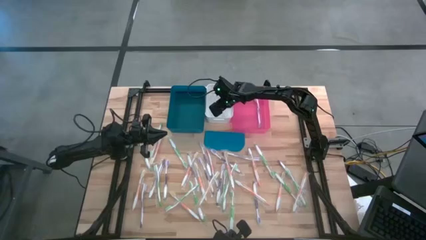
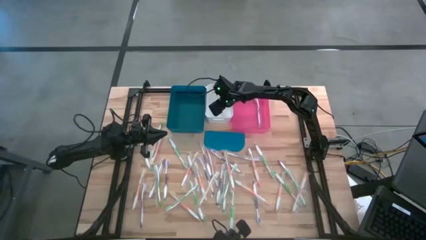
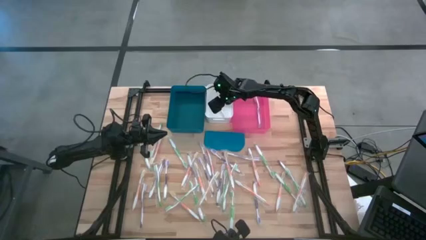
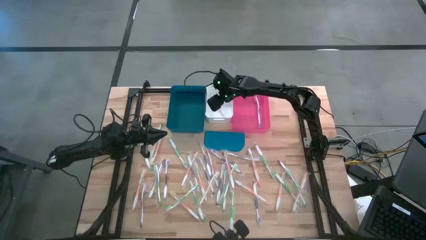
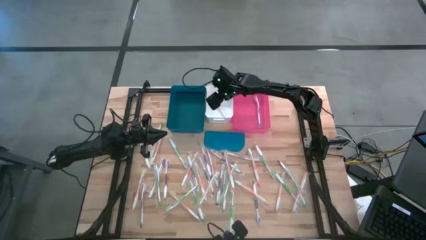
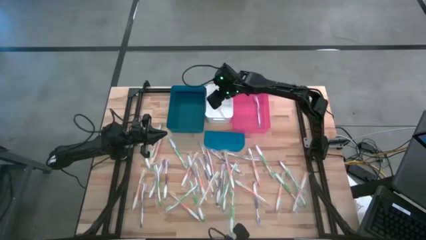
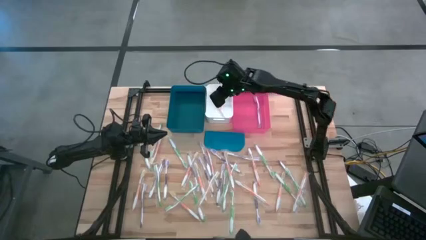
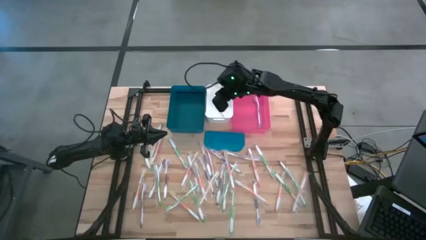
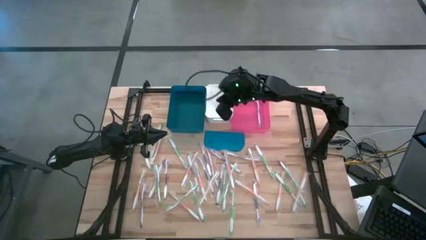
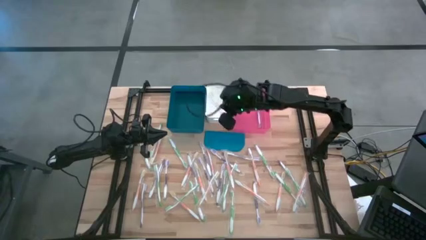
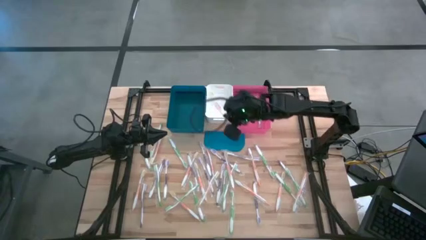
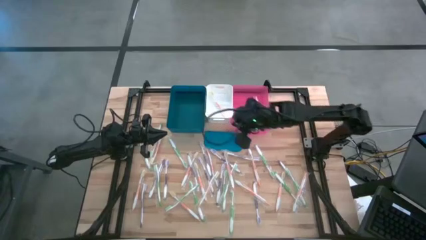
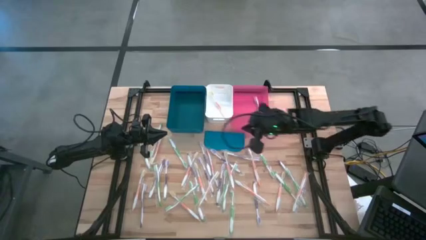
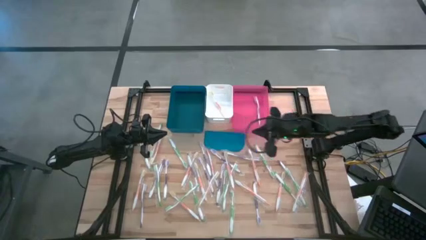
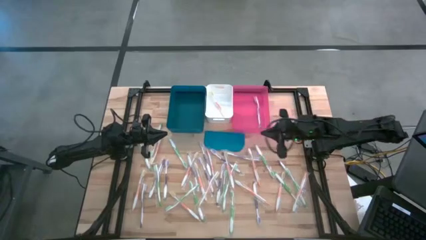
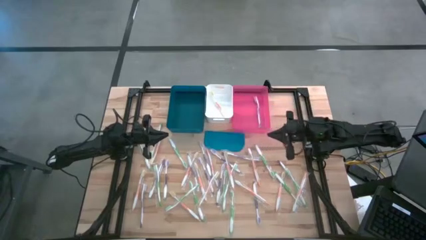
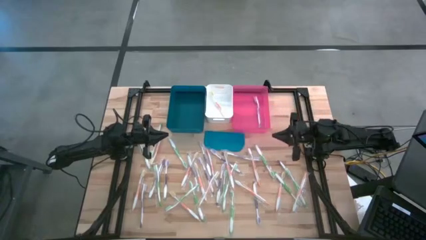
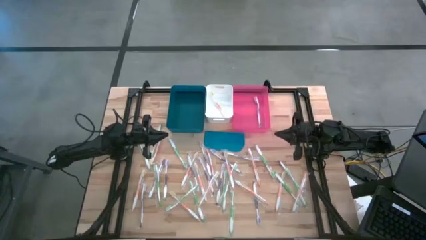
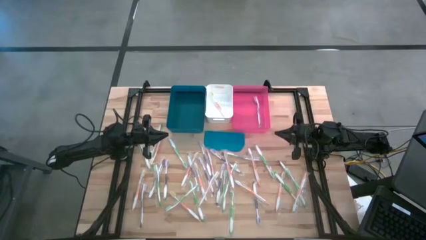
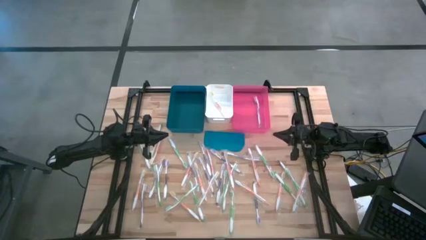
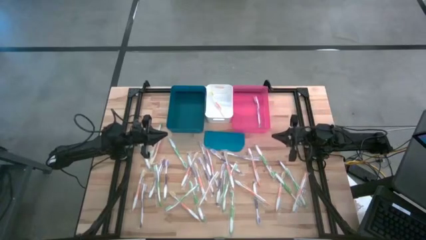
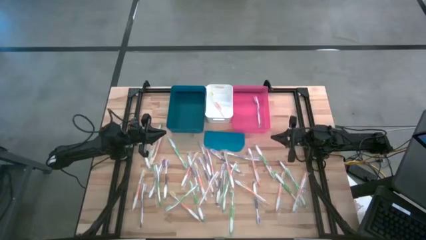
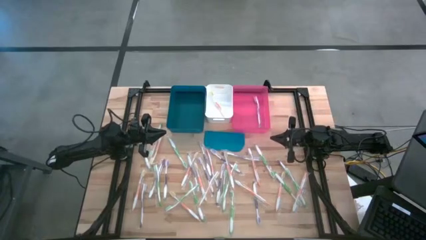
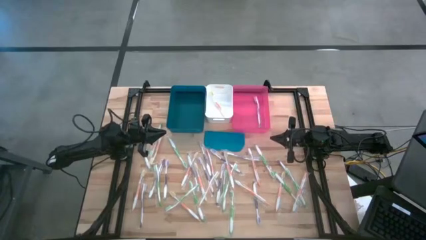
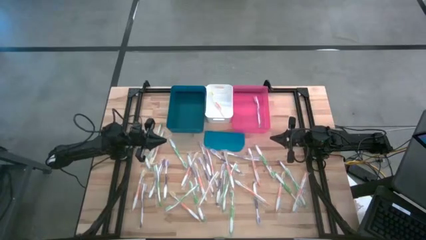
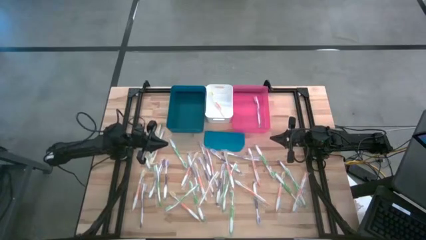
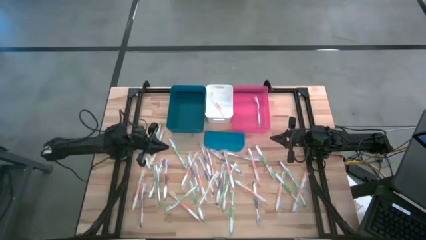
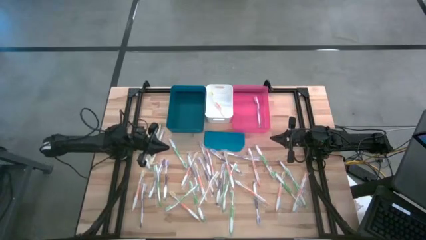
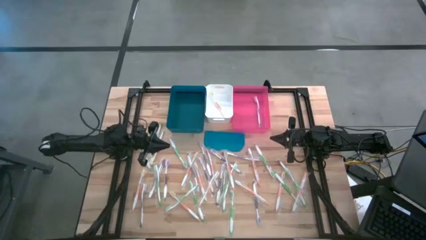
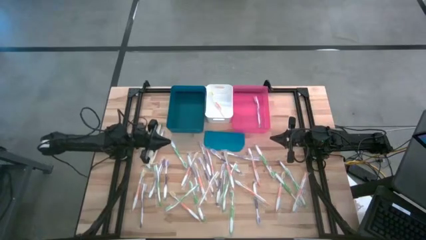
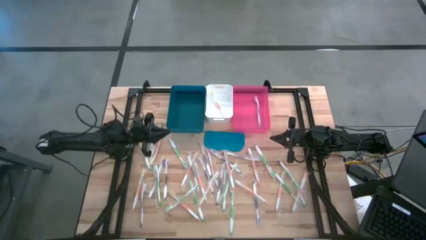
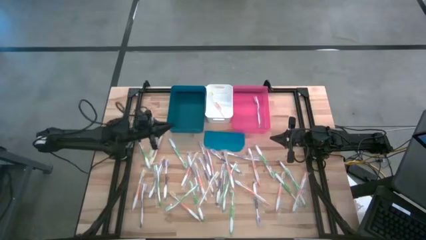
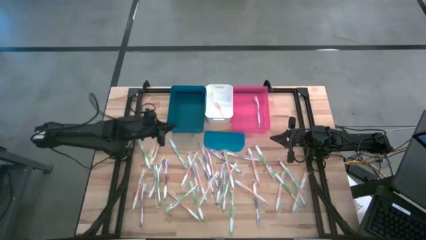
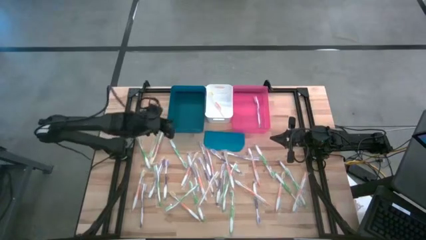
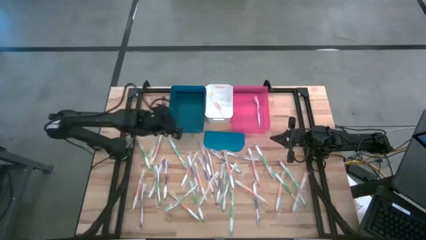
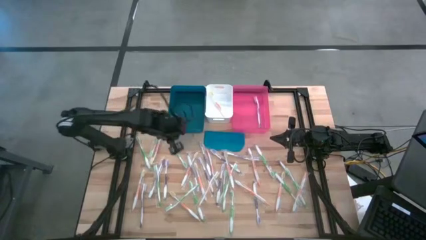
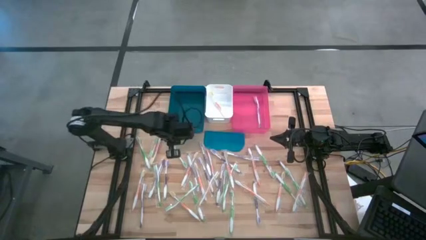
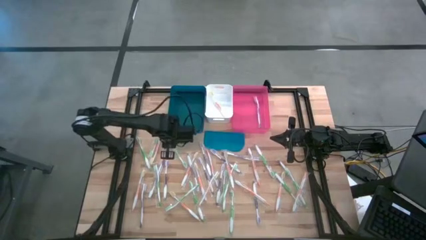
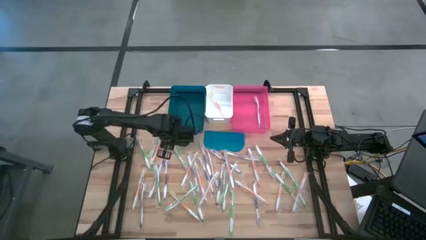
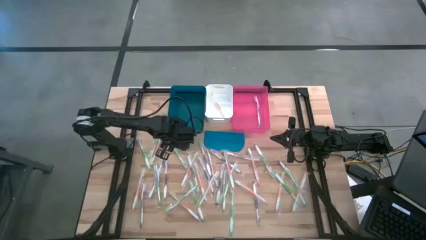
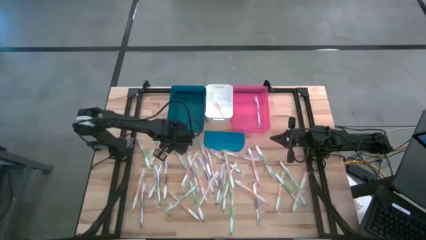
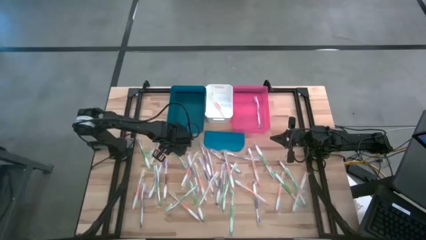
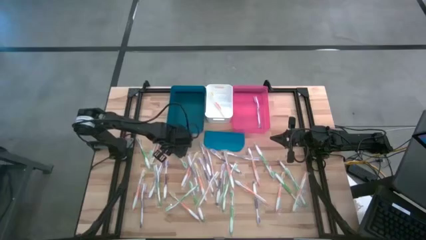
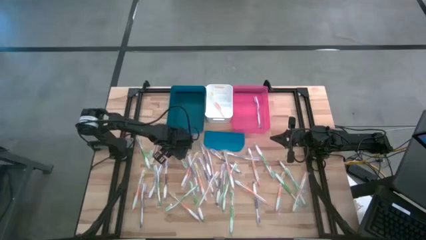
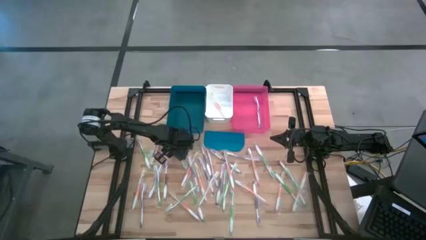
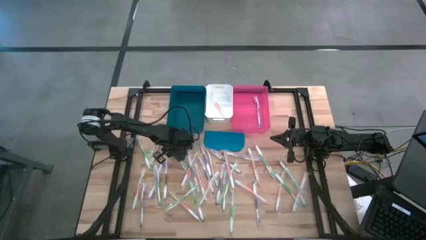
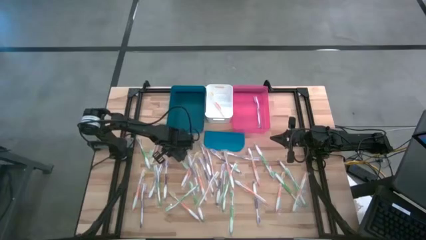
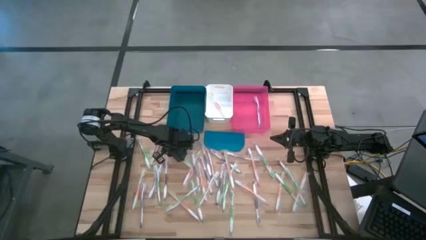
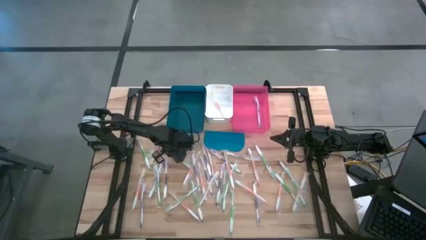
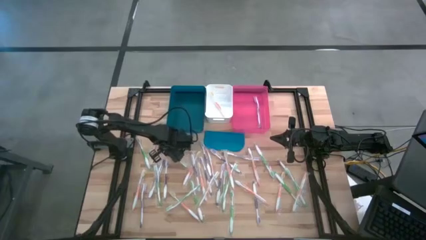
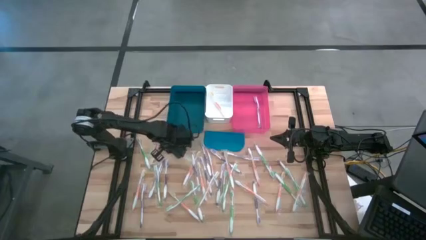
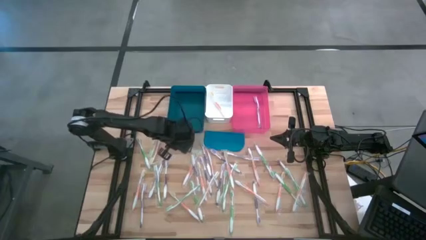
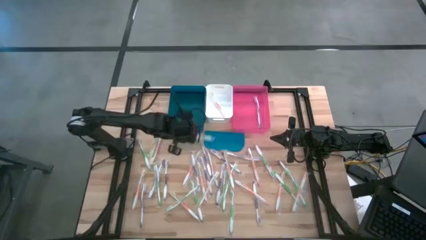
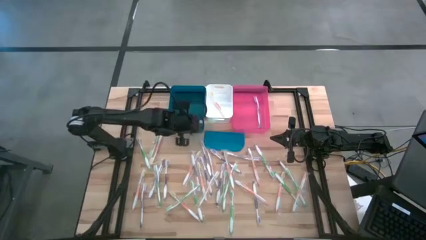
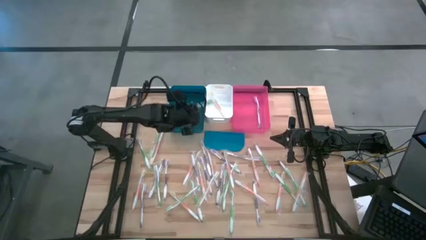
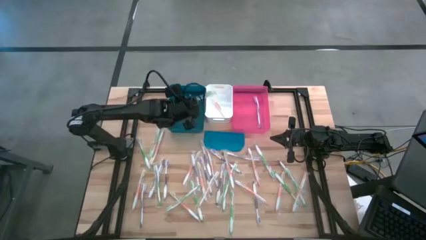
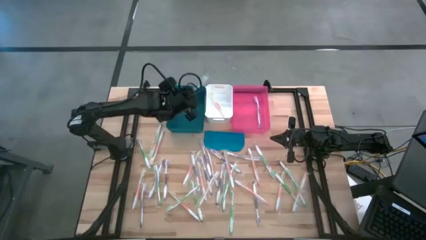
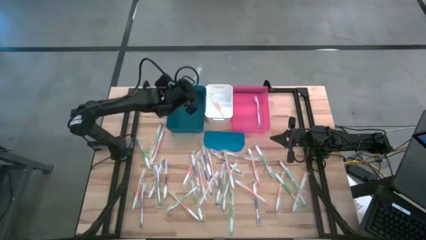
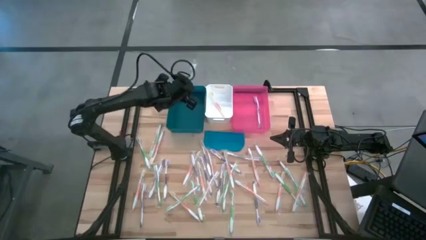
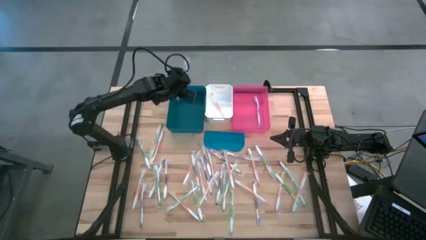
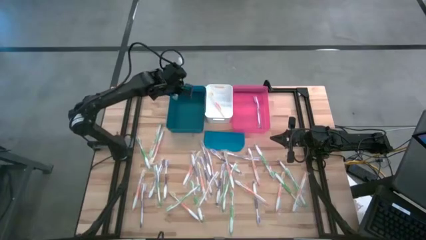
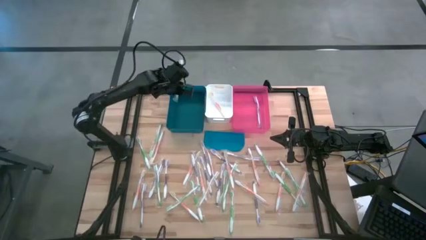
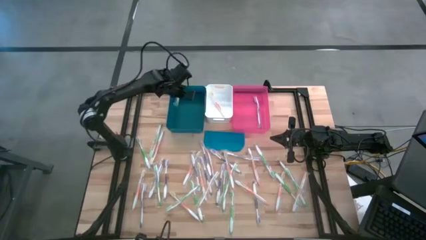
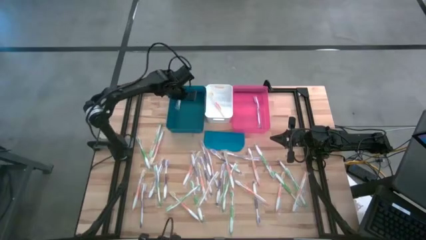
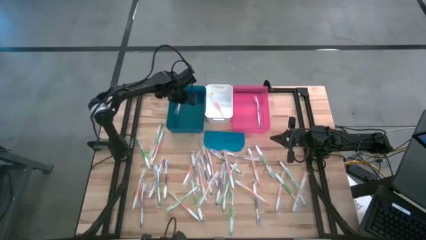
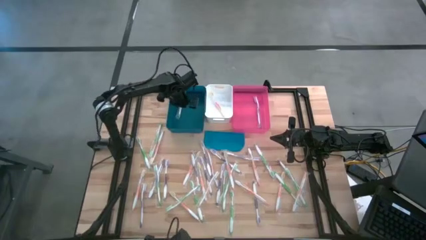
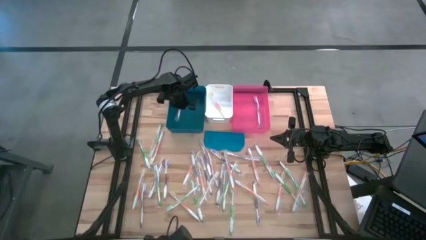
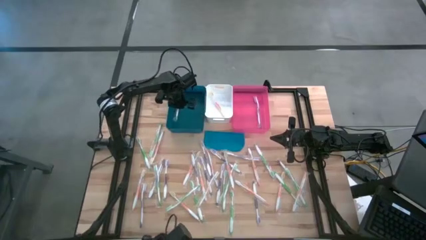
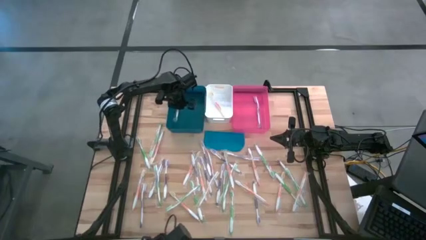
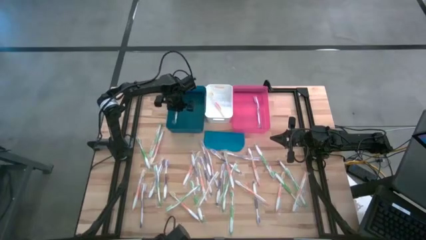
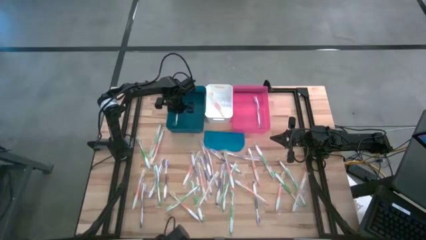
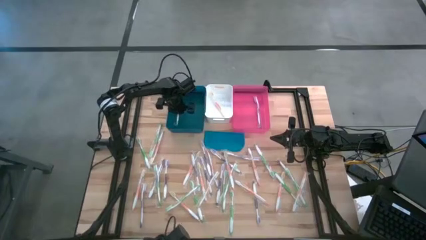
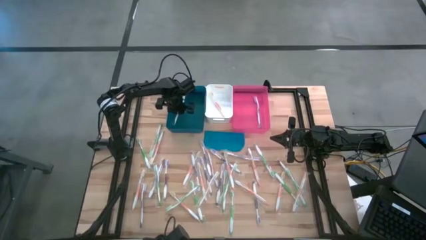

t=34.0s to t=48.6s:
Task: Pick & Place Toothbrushes
Put the green toothbrush into the blue bin
